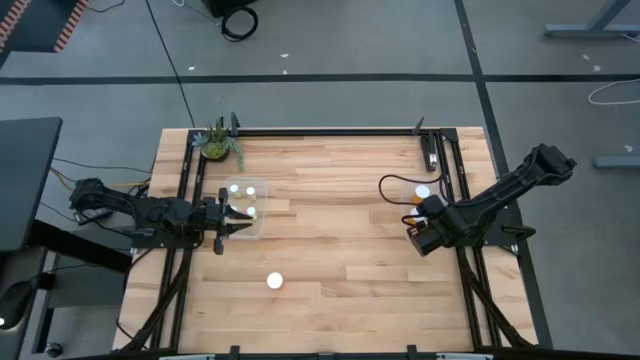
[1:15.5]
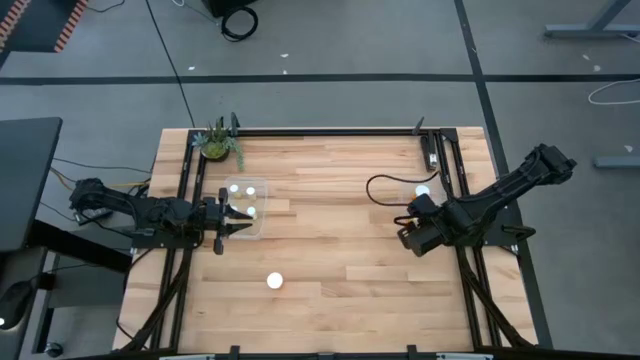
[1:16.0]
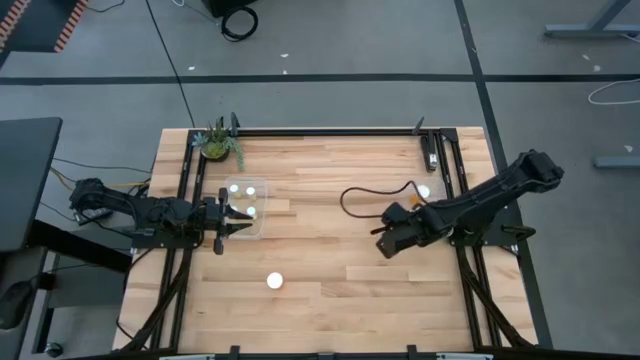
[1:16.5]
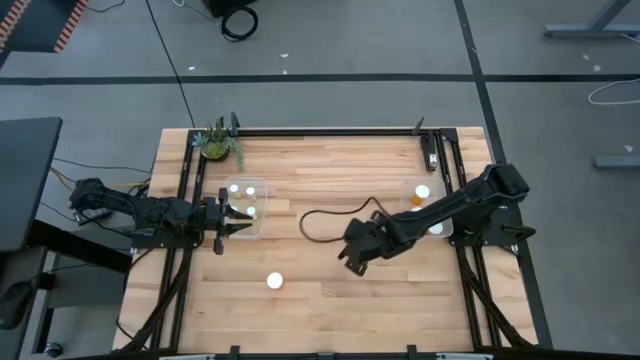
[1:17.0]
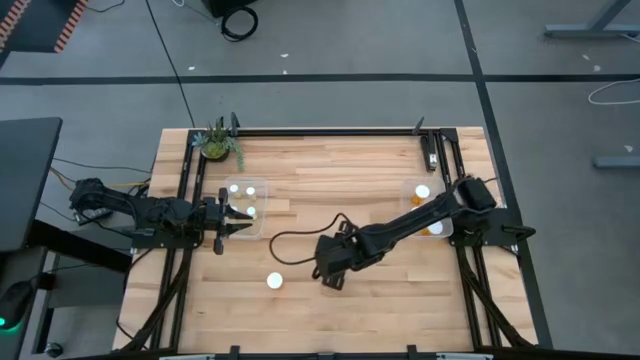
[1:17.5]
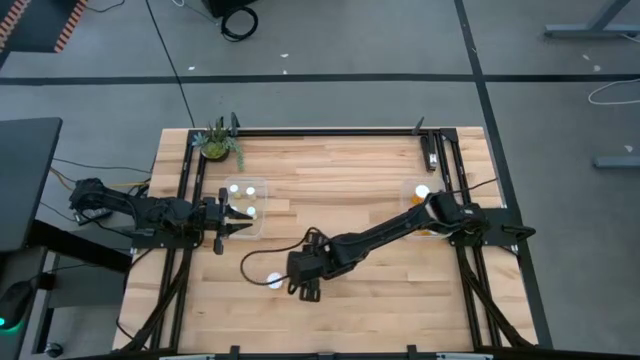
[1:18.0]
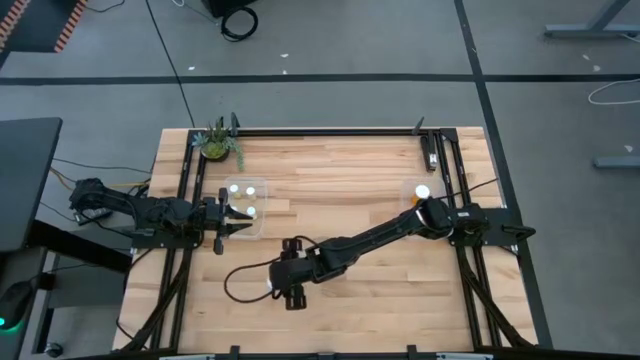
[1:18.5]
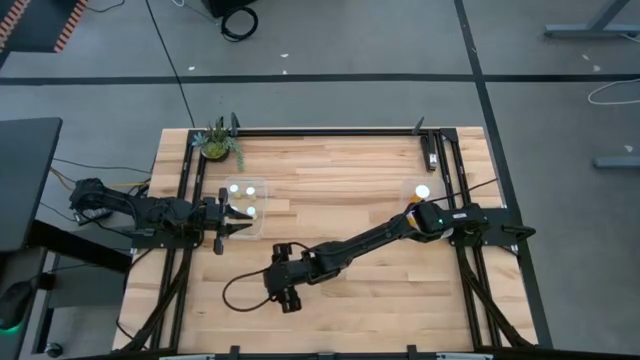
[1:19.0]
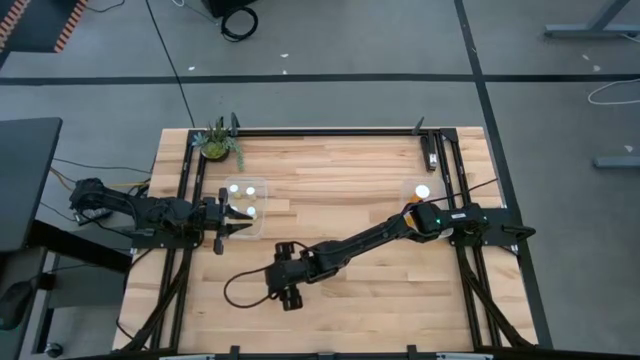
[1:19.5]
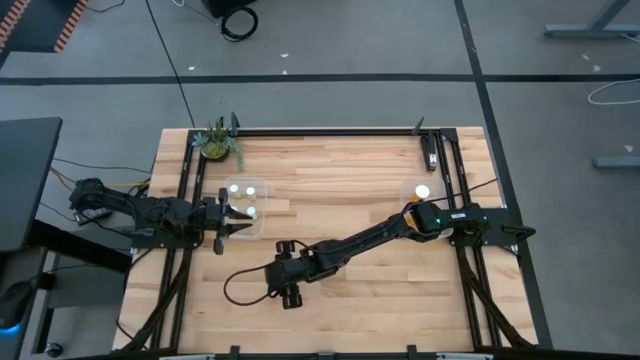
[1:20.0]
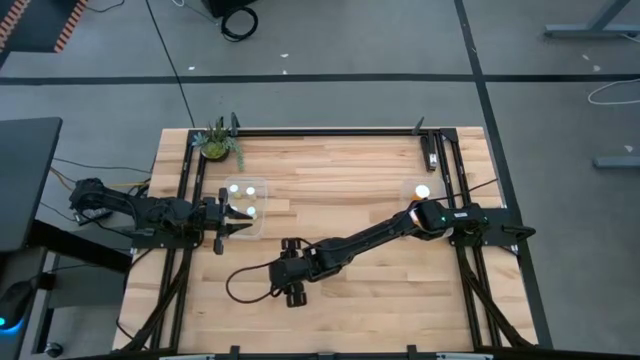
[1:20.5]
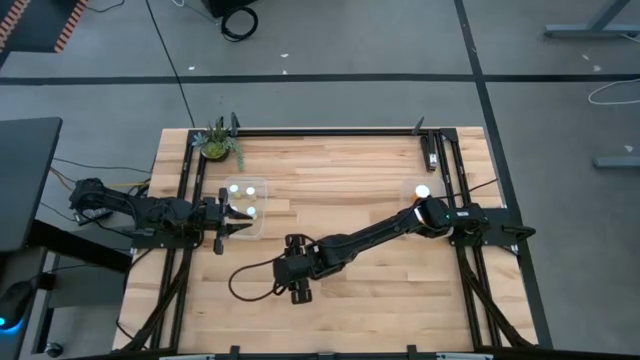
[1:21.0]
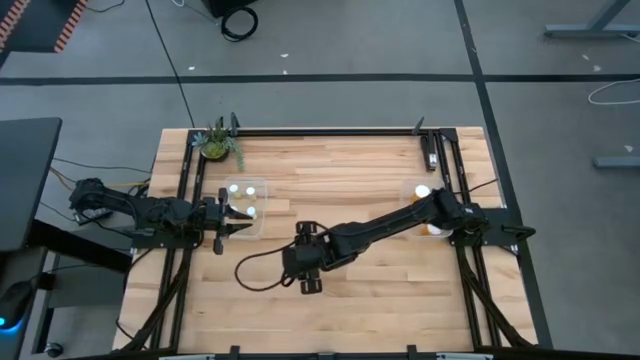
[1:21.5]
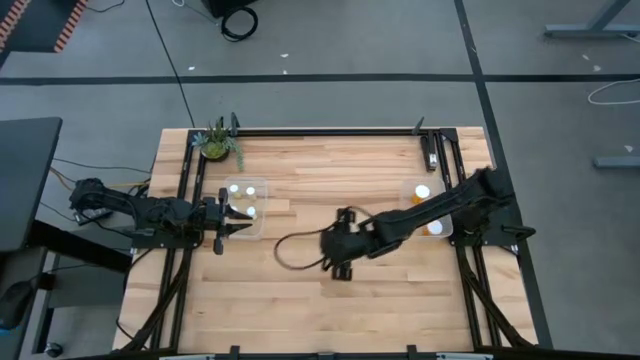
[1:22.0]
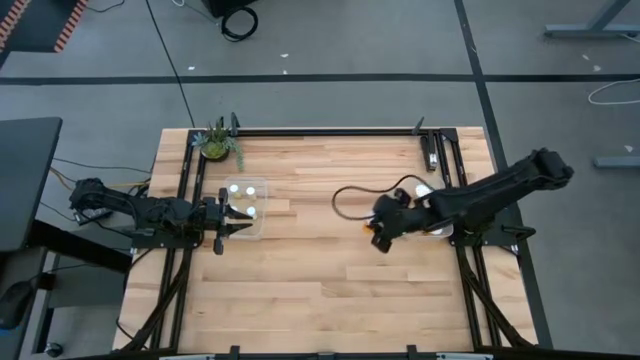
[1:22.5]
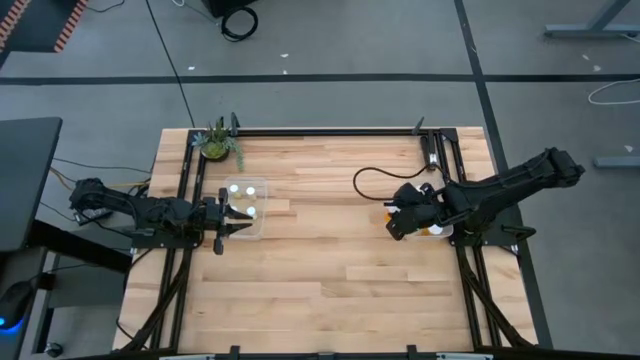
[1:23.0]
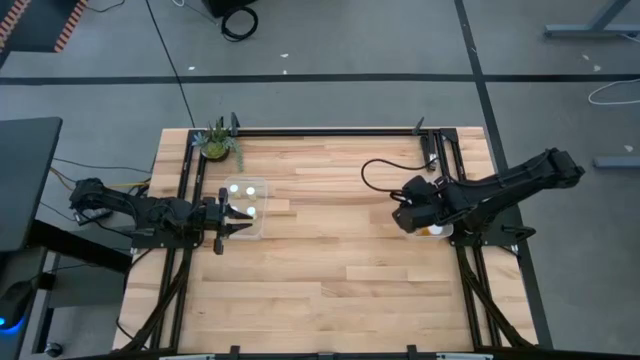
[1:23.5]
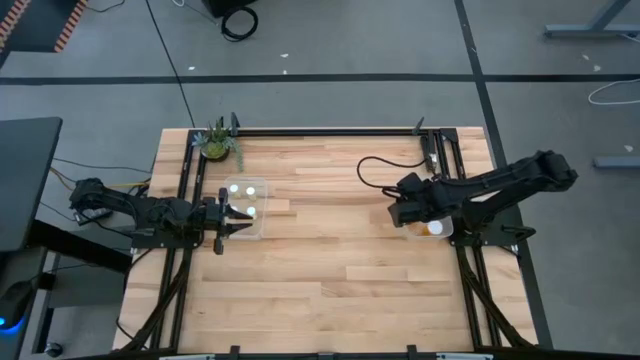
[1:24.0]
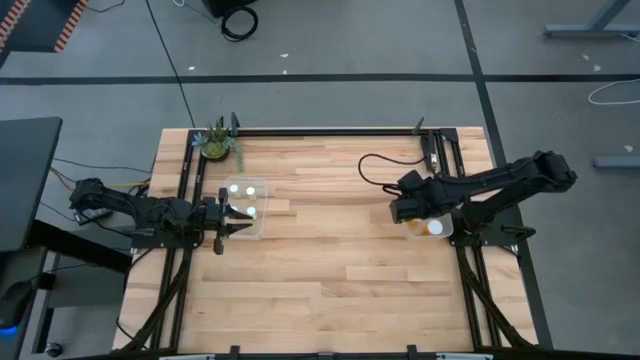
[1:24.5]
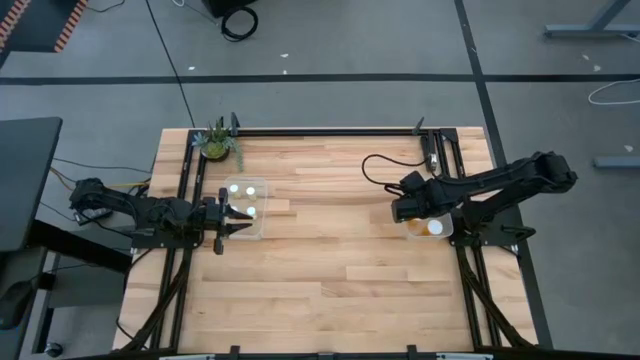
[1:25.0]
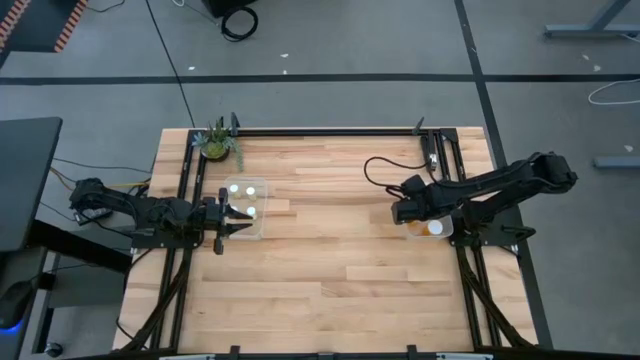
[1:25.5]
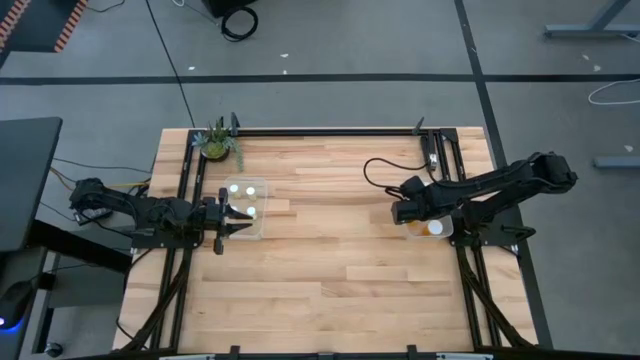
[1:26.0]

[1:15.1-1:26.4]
Task: Pick and place medicine bottles into bin by pill shape (circle, oval)
Put the big orange pill bottle into the right transparent bin

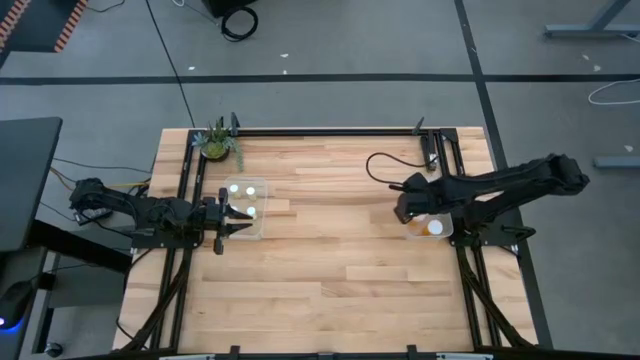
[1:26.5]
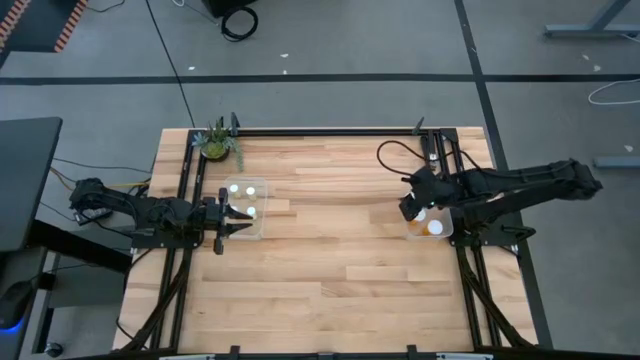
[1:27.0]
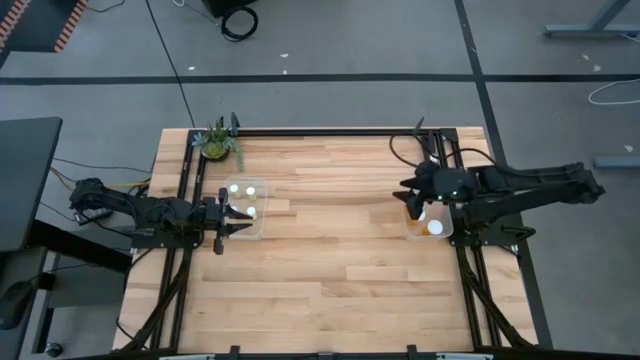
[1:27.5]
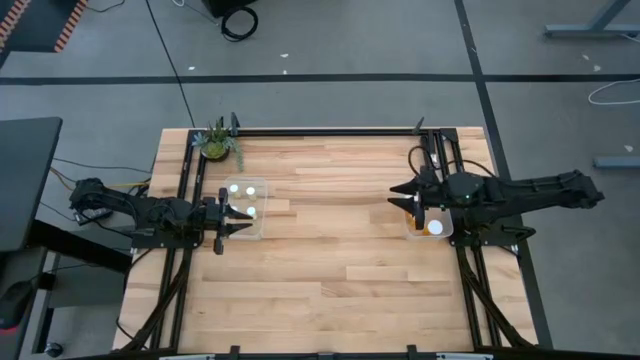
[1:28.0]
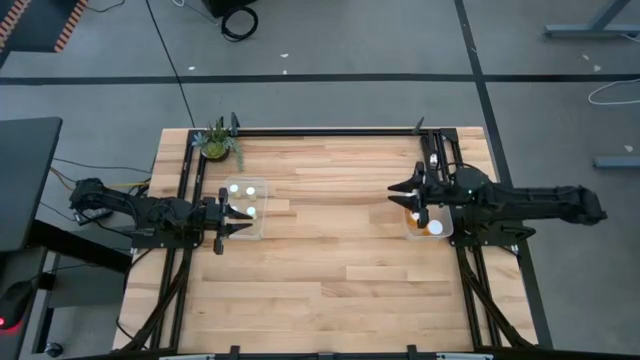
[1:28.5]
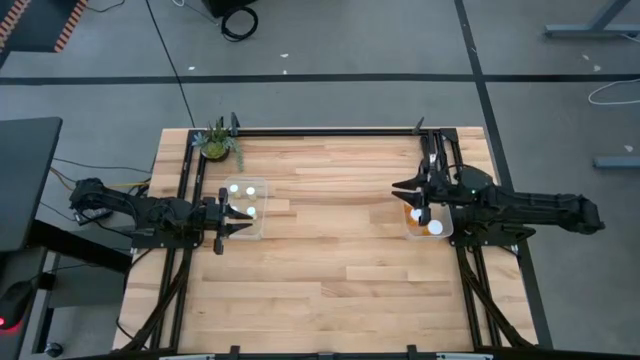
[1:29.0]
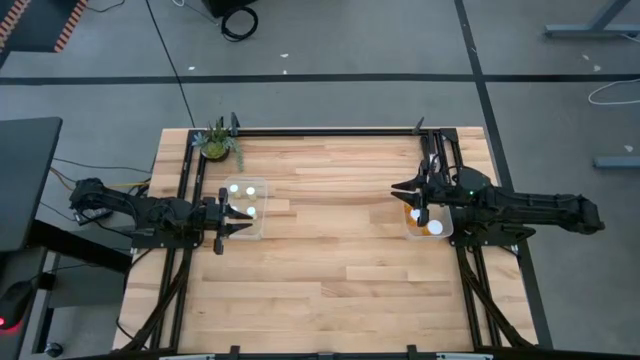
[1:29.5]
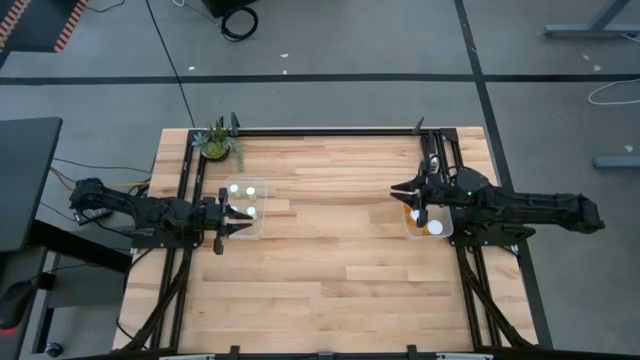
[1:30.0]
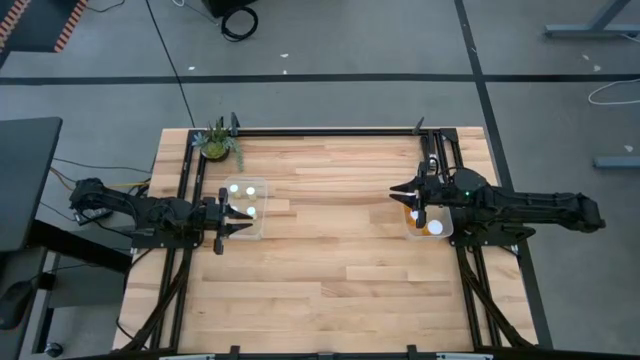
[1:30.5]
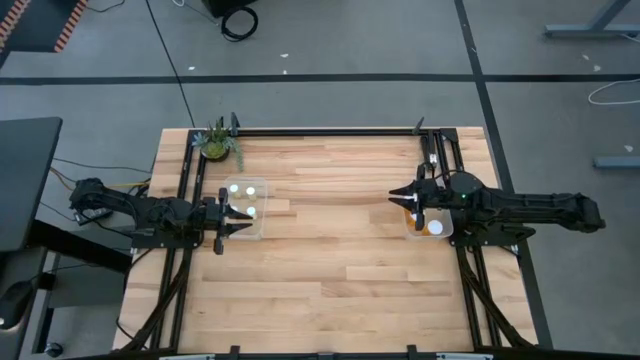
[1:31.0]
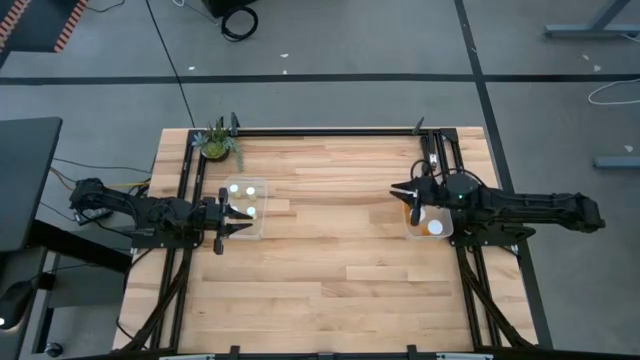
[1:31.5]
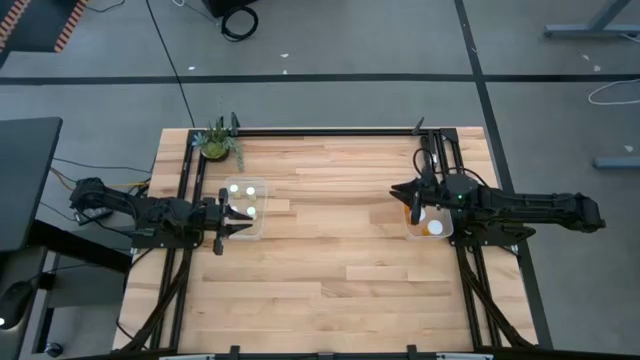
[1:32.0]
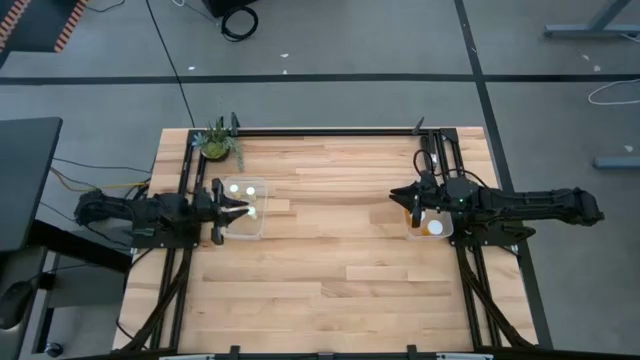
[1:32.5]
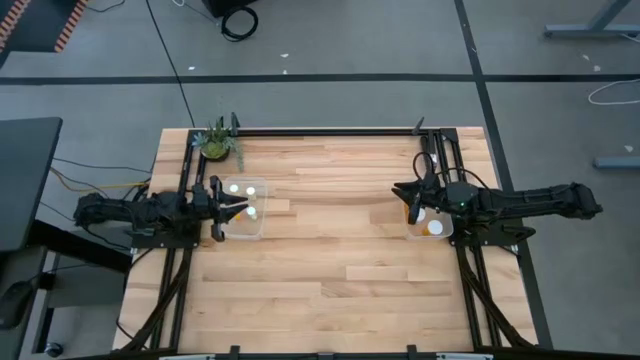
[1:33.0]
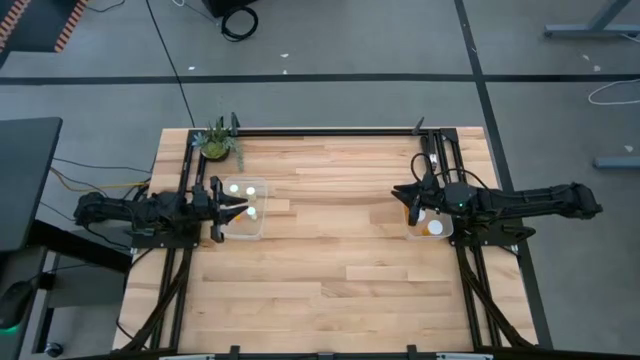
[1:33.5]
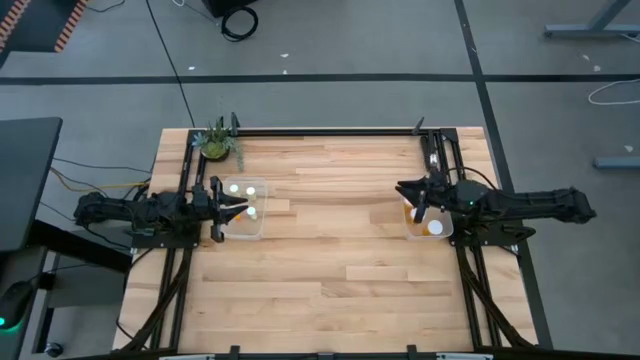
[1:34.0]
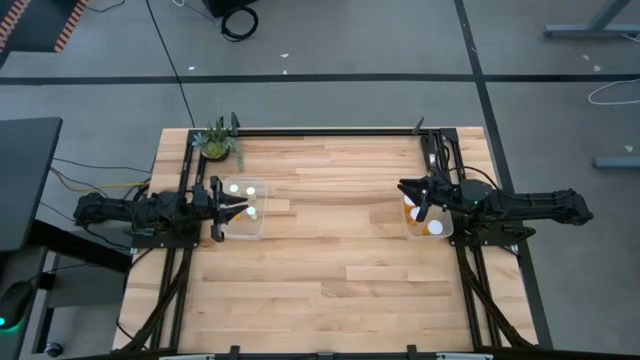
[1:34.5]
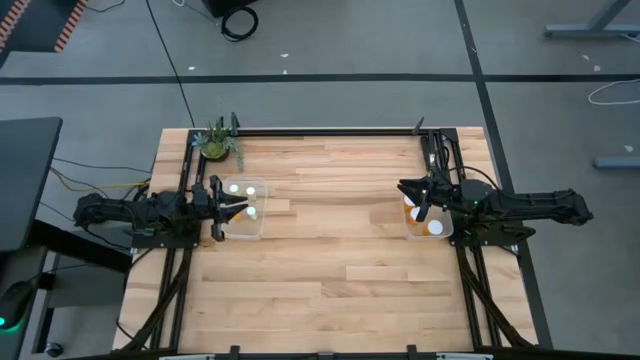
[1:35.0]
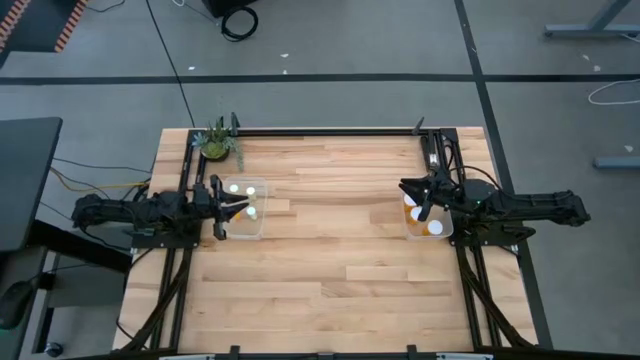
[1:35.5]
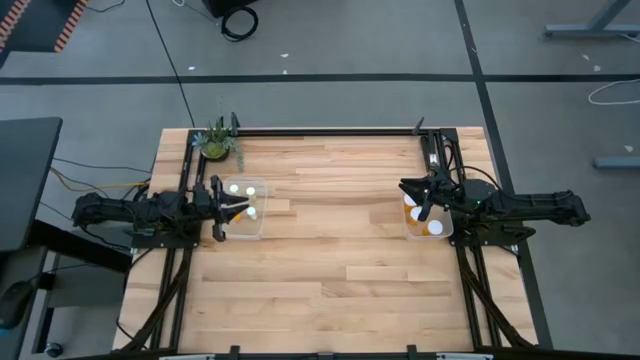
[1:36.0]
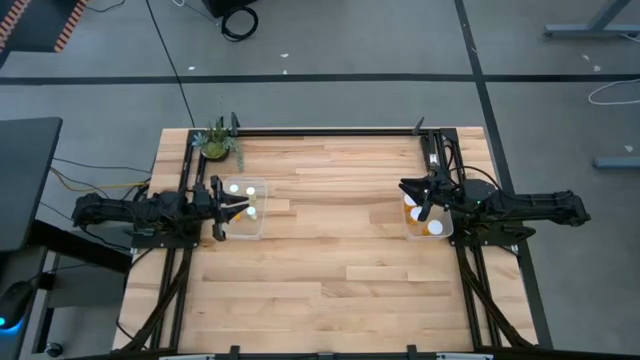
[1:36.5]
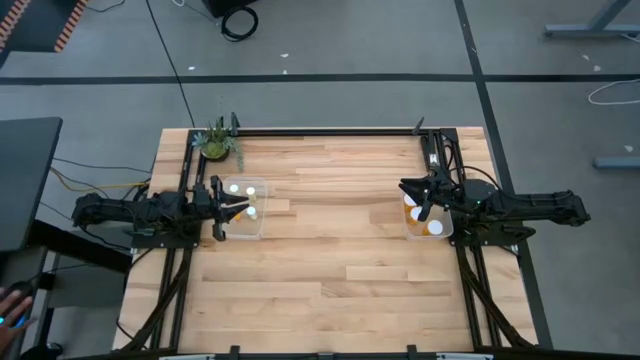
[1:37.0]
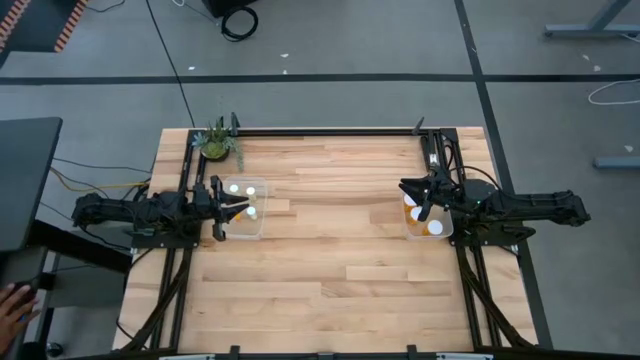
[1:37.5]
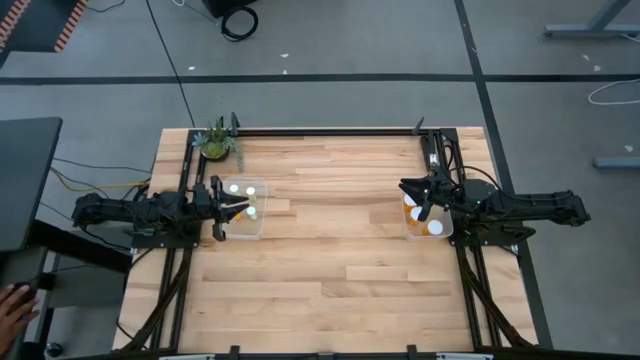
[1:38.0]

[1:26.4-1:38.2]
Return to Home Position
